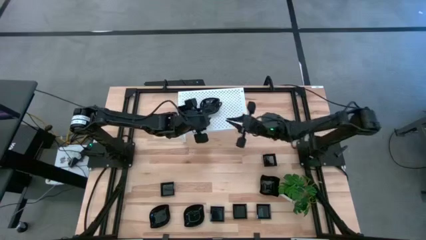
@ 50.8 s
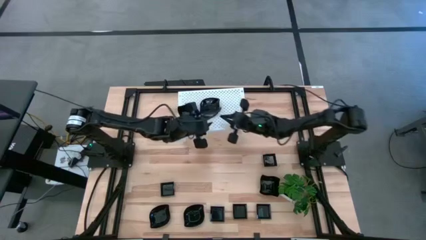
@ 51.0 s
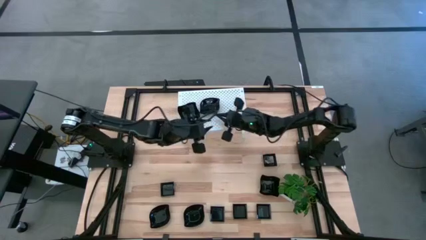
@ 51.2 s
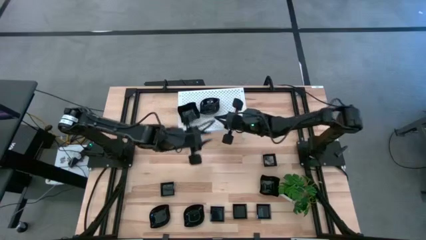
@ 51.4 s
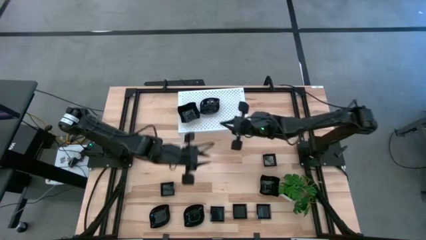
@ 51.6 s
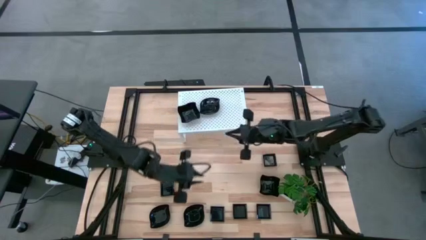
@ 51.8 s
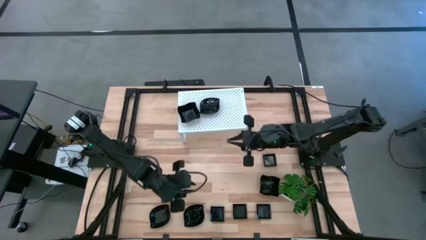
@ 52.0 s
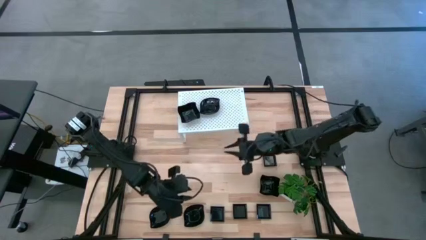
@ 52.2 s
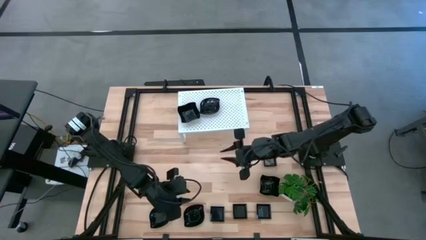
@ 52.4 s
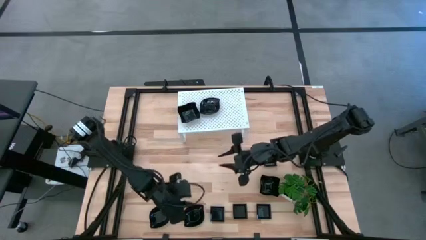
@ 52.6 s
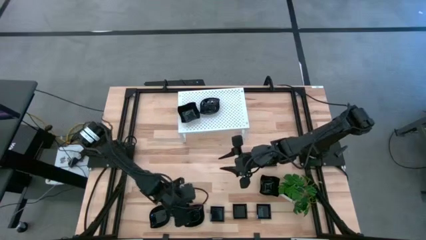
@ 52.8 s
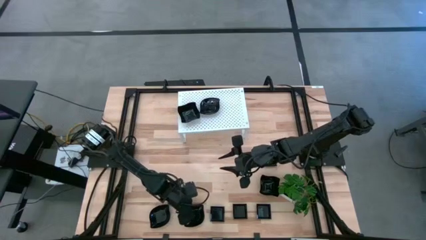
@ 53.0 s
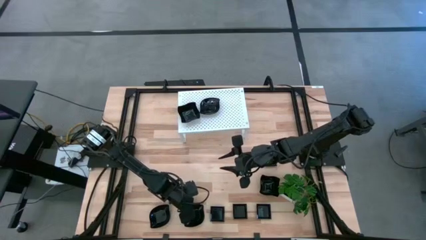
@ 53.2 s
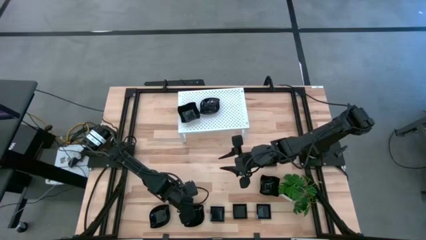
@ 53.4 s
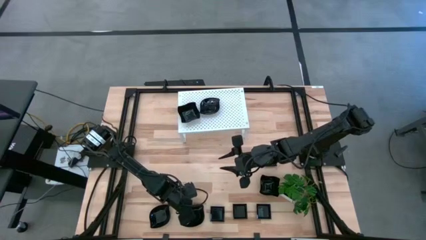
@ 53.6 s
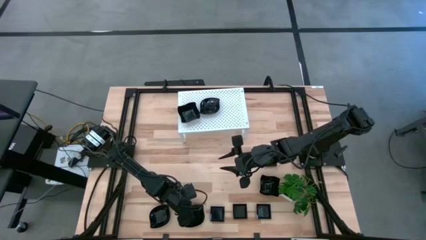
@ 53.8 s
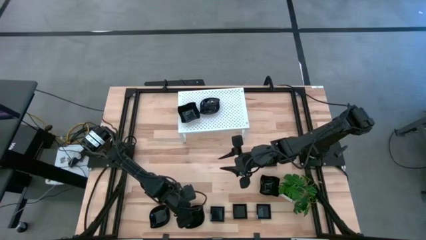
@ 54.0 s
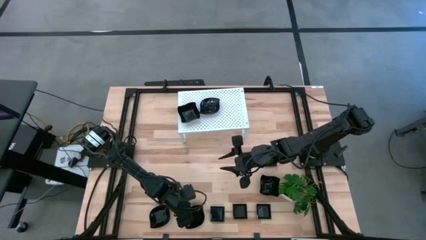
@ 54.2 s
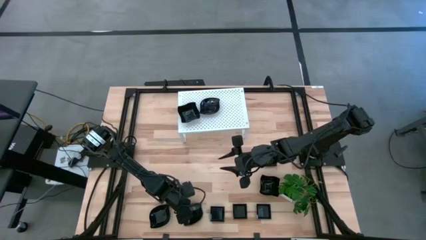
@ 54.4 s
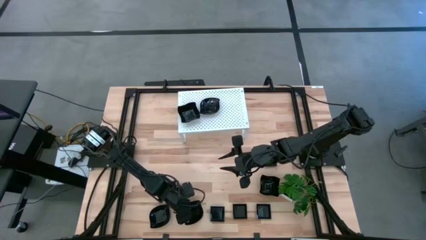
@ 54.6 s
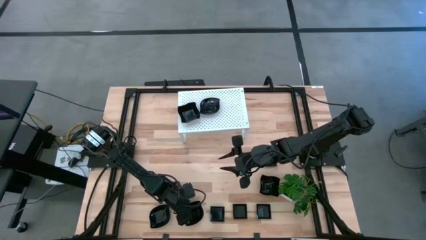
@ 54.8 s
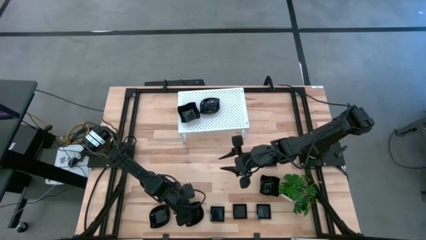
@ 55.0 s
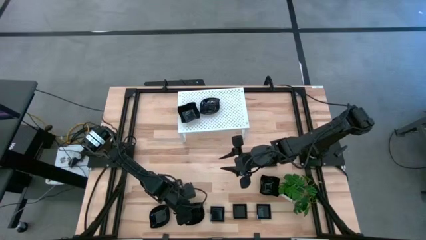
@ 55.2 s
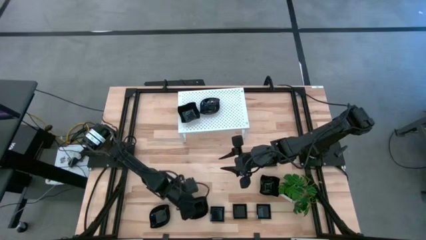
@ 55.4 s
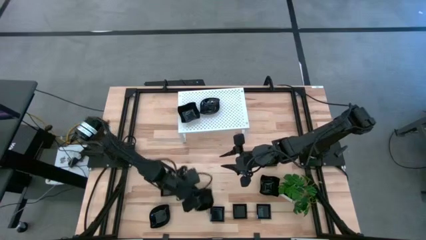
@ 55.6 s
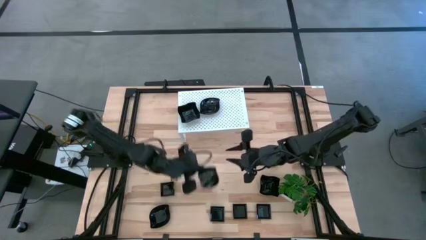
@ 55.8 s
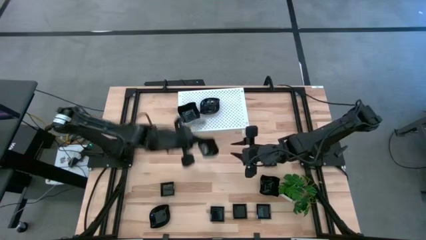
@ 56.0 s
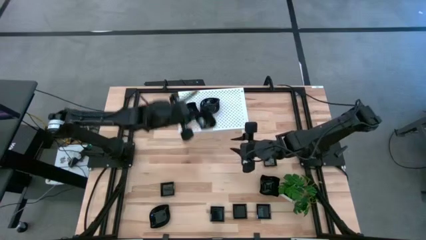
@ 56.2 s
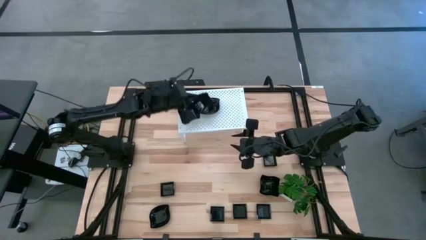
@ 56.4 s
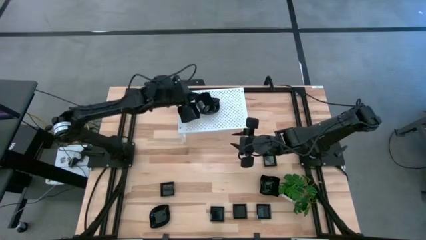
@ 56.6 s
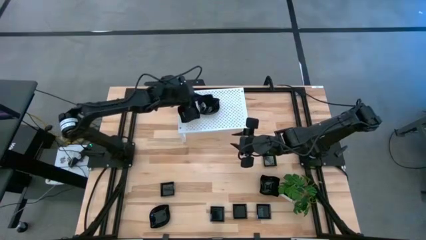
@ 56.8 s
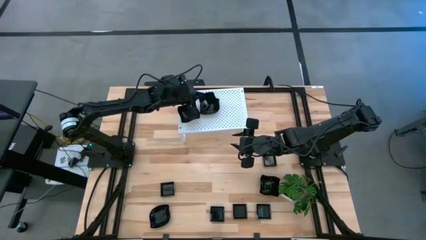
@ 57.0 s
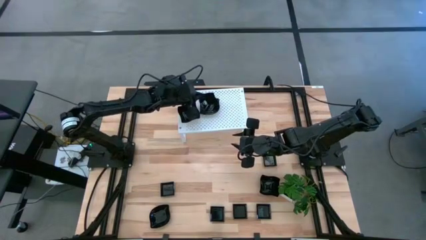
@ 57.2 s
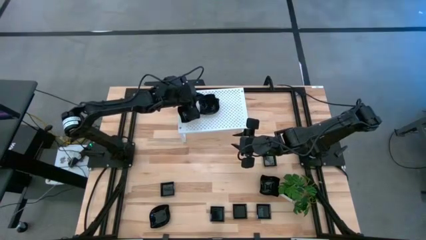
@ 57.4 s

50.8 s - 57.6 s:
Task: Pick & Place Mini shaped plates
Stack the black leaf shaped plate on top of the black leaf shaped plate on the shelf

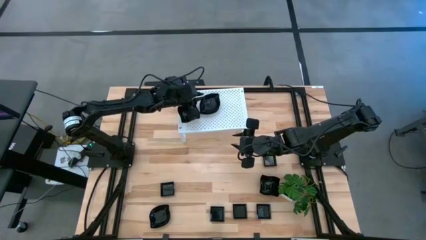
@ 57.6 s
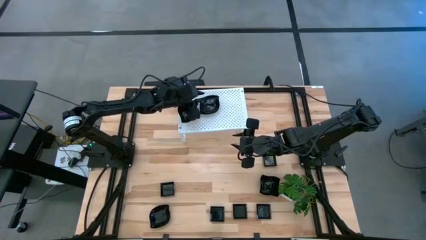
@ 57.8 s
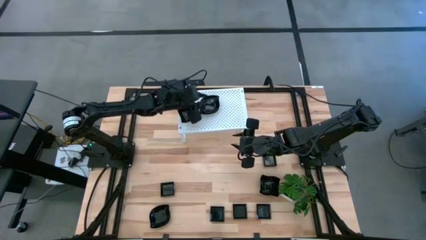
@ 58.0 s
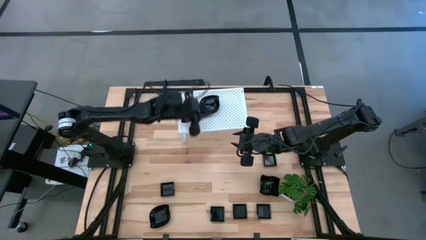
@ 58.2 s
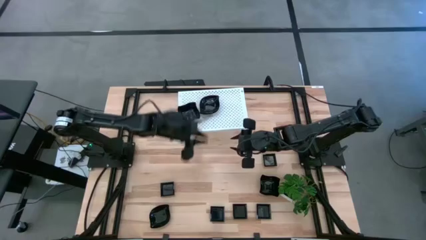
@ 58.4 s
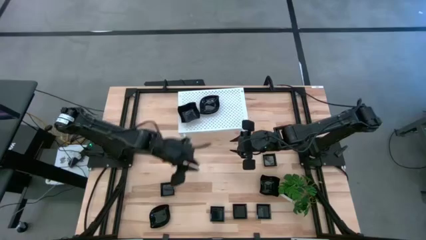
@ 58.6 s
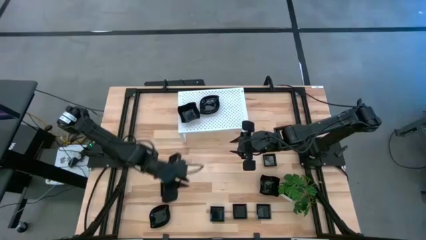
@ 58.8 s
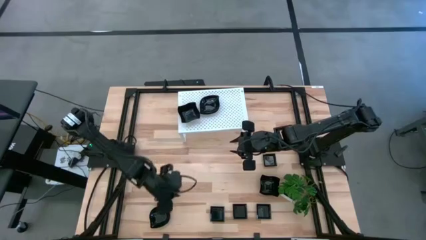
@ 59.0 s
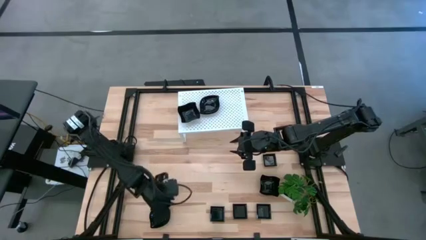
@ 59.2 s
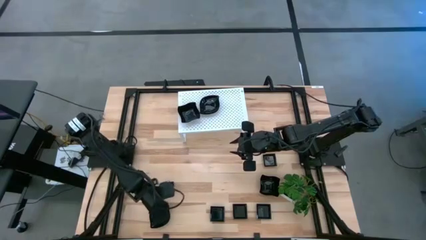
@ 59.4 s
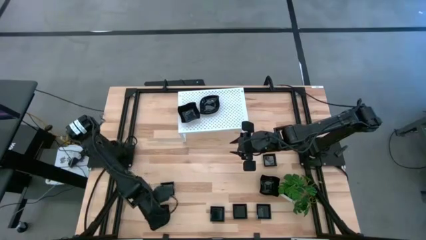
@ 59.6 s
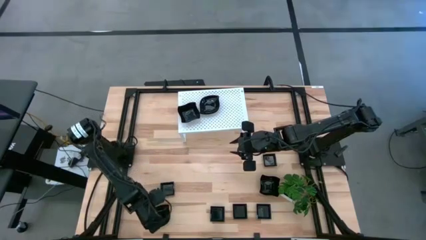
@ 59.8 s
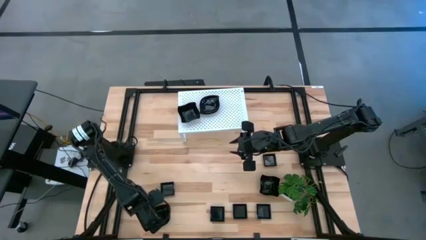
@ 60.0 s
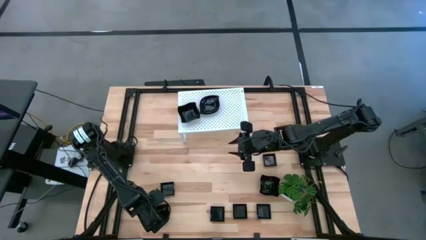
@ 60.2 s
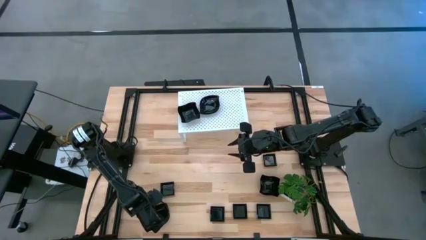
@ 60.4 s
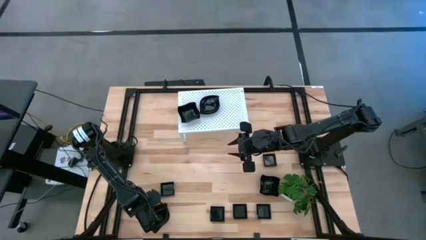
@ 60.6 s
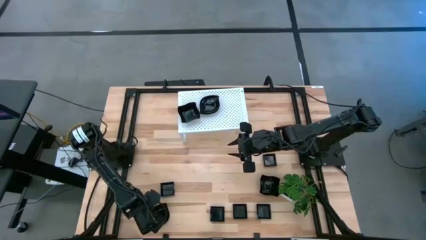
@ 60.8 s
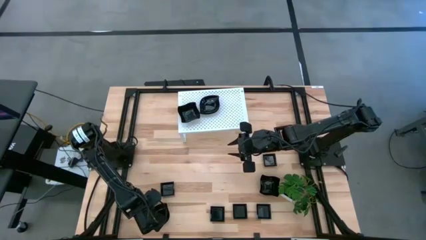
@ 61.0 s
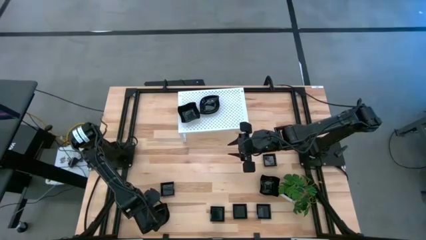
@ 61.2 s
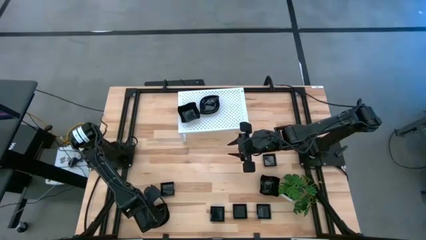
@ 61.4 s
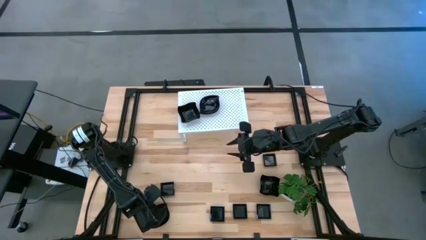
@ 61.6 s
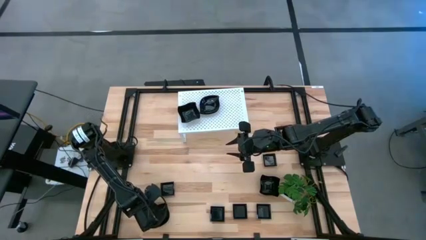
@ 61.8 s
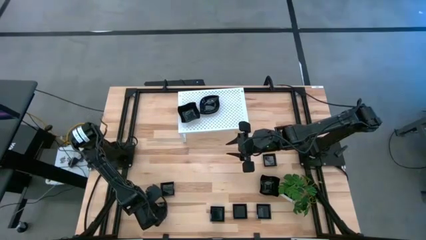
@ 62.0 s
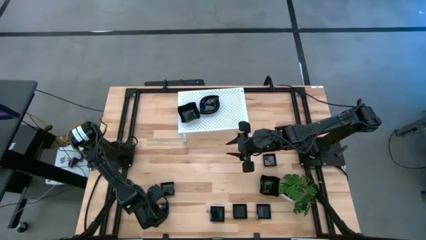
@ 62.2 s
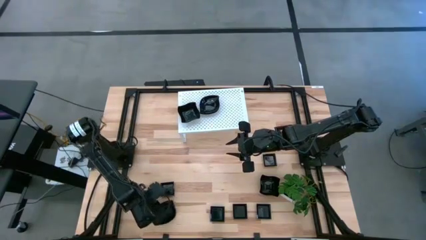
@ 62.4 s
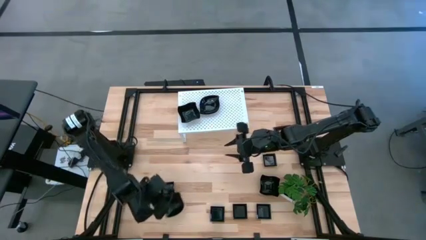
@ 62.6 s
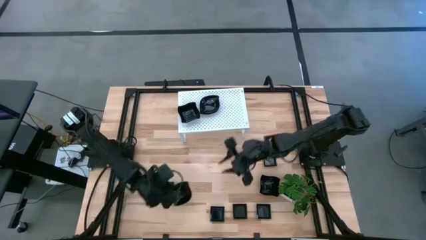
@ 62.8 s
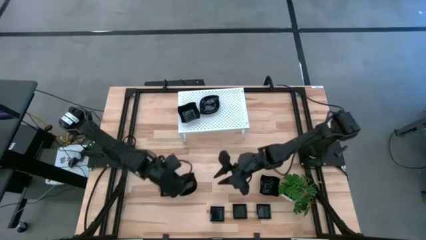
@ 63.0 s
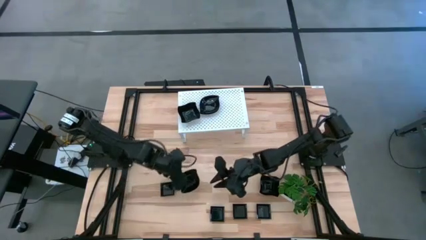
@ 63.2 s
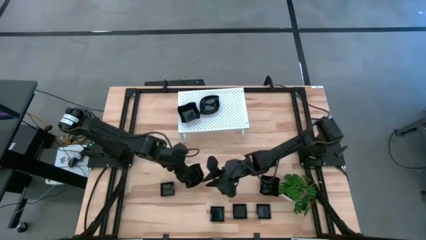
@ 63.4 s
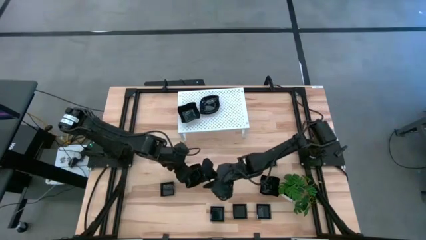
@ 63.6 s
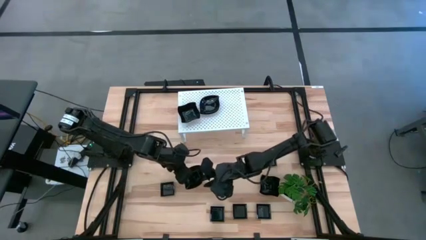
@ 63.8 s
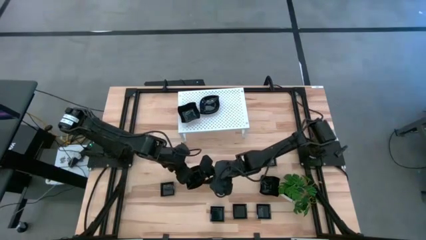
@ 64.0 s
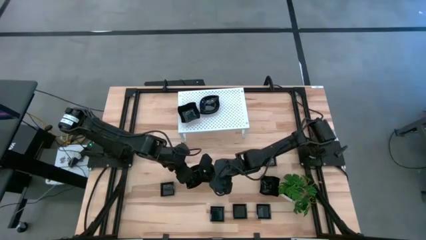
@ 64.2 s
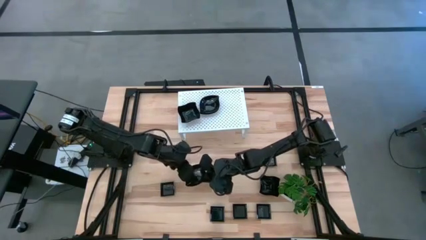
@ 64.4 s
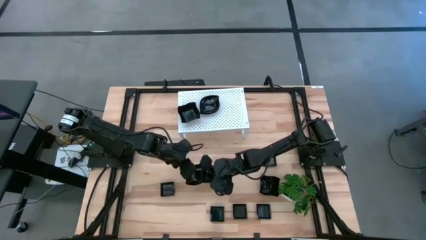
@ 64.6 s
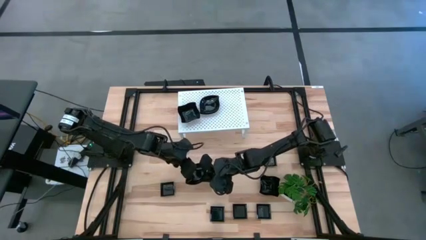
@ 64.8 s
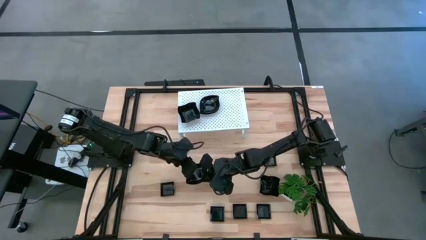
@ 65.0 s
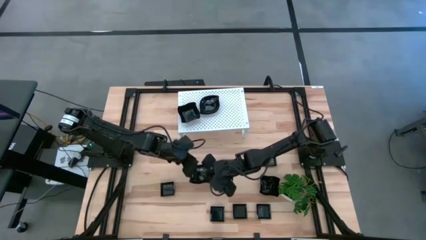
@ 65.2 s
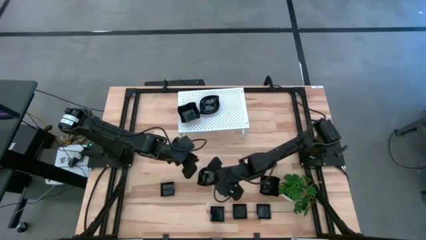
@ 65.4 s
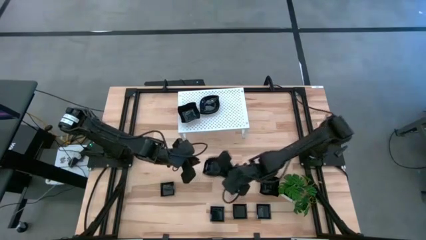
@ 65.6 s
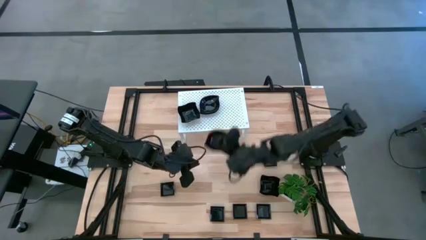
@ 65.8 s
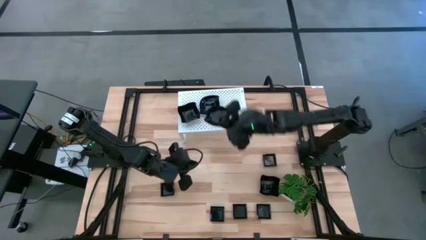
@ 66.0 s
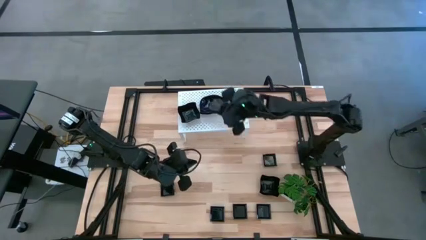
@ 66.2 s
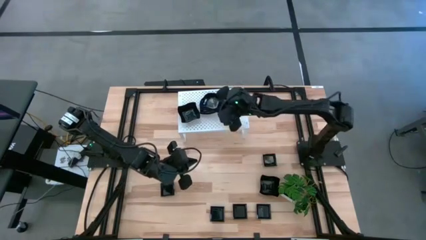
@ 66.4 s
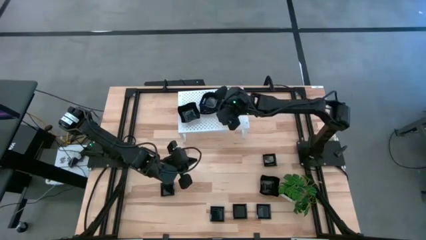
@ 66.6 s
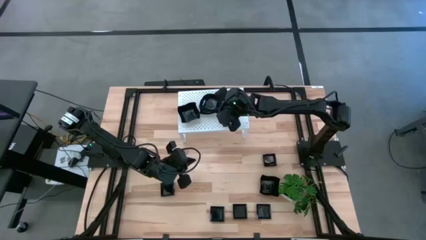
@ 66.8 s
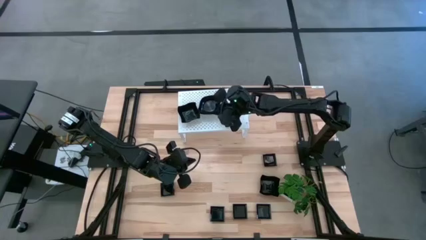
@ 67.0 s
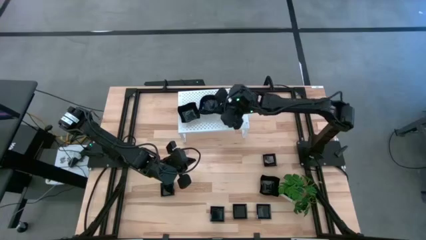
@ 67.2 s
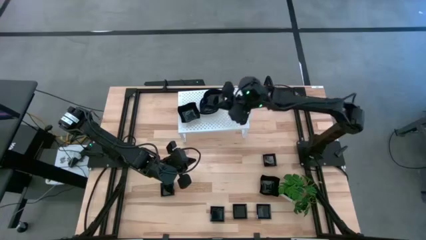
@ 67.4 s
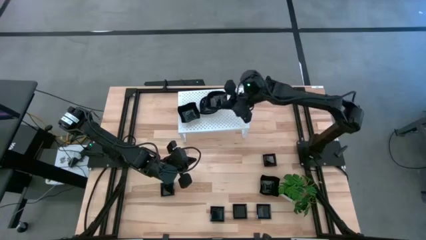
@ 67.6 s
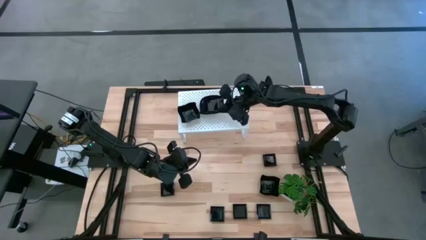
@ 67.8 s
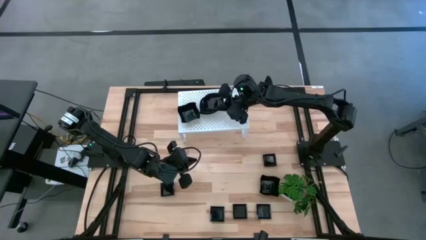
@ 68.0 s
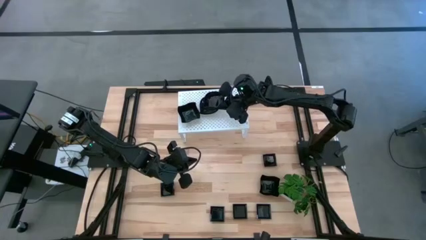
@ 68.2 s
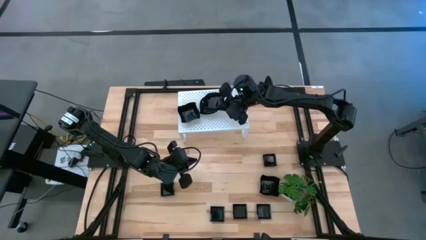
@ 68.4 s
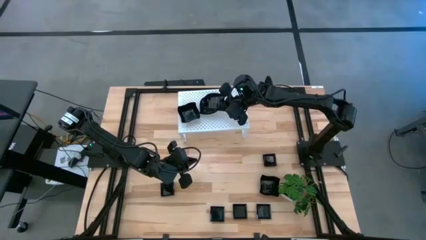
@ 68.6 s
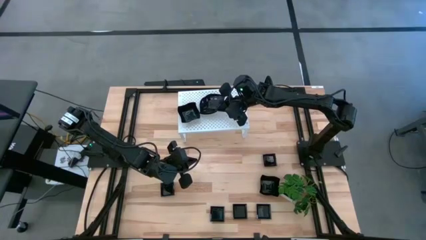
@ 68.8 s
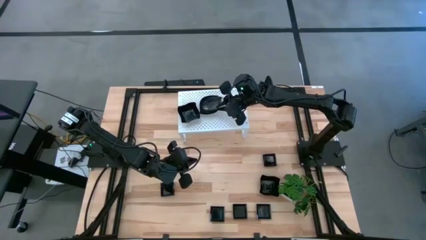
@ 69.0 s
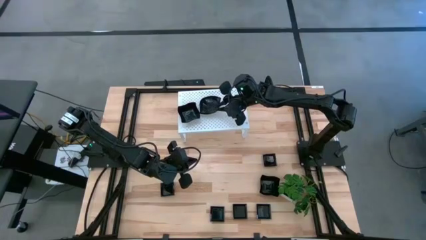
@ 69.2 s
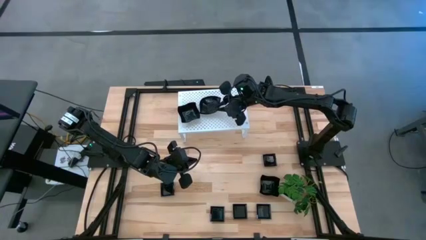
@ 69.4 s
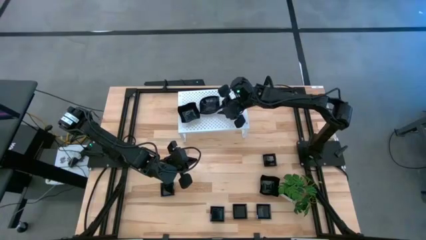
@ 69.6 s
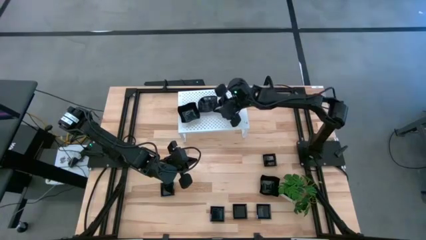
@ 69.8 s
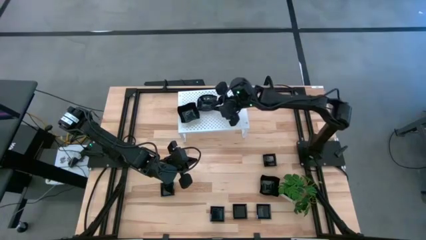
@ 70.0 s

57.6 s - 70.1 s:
Stack the black leaf shaped plate on top of the black leaf shaped plate on the shelf
